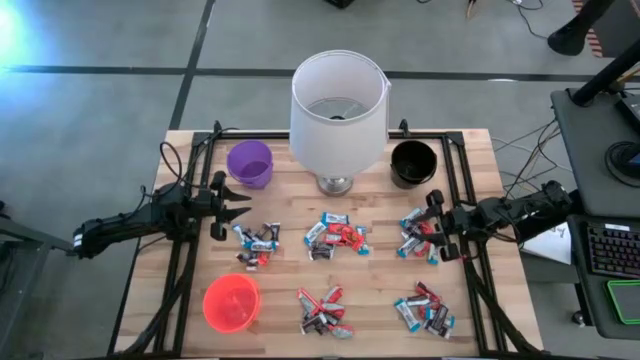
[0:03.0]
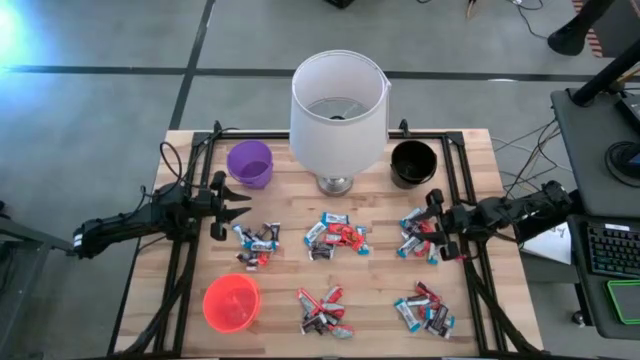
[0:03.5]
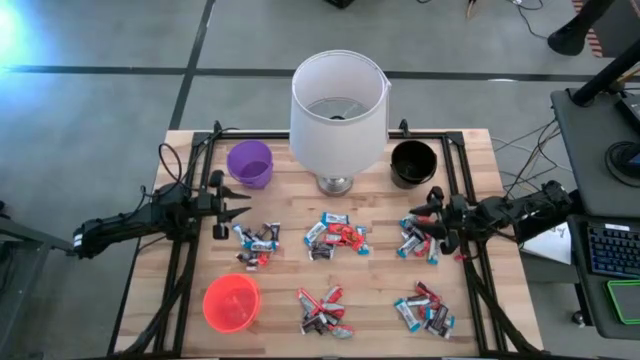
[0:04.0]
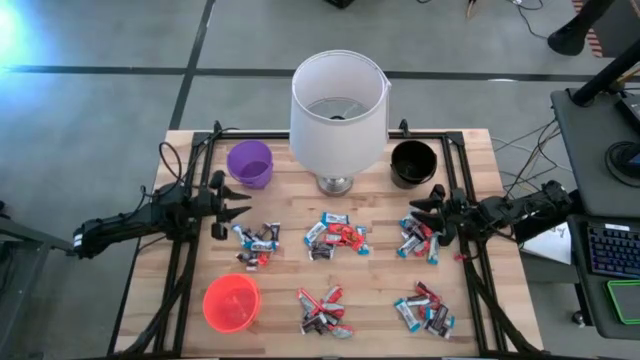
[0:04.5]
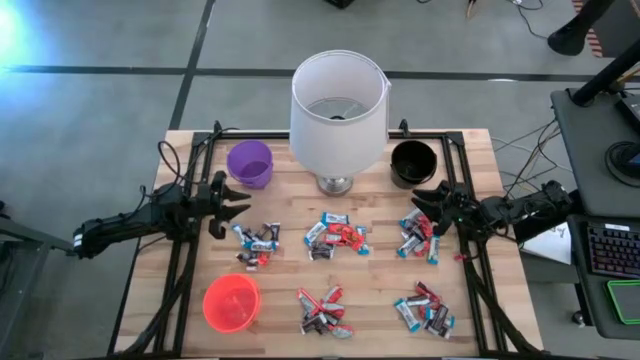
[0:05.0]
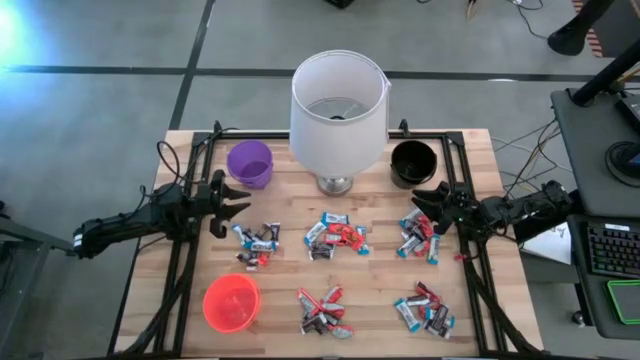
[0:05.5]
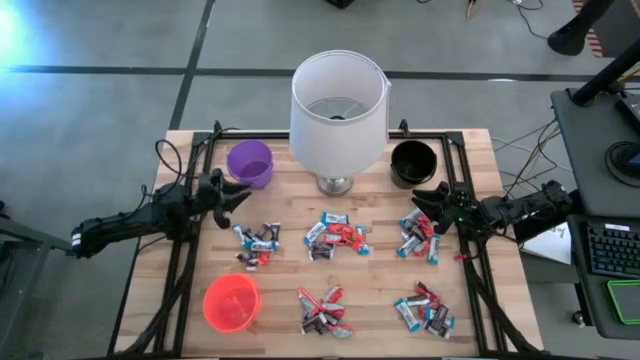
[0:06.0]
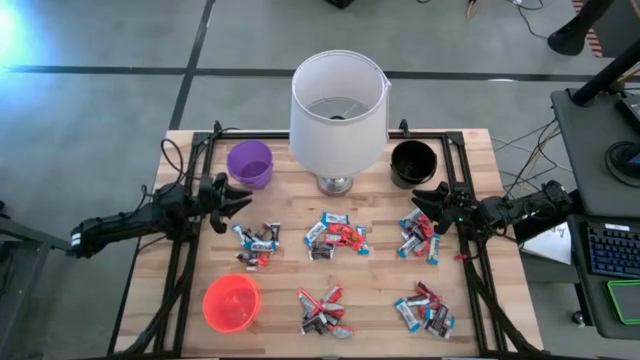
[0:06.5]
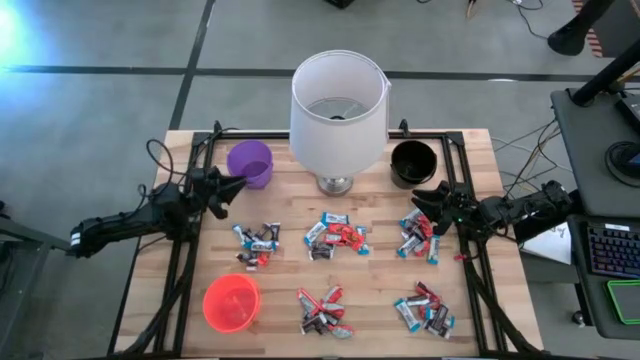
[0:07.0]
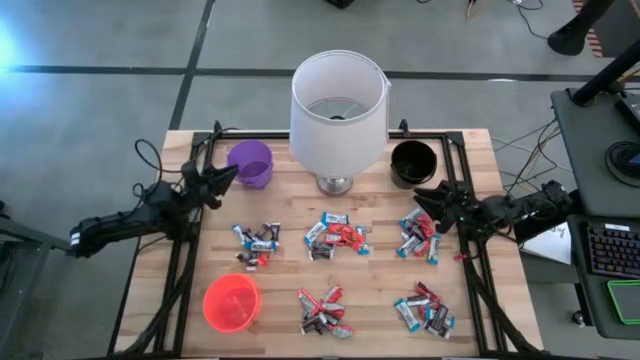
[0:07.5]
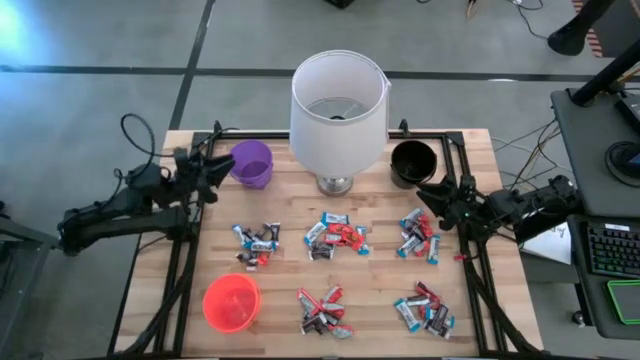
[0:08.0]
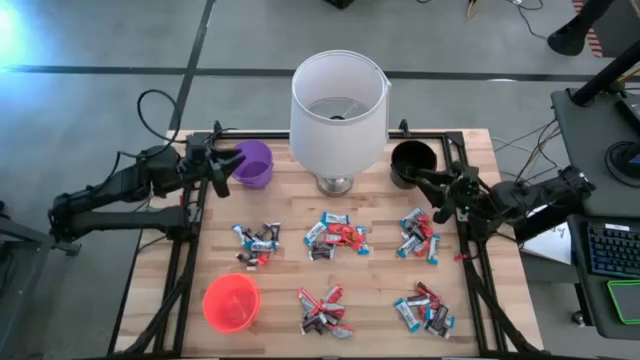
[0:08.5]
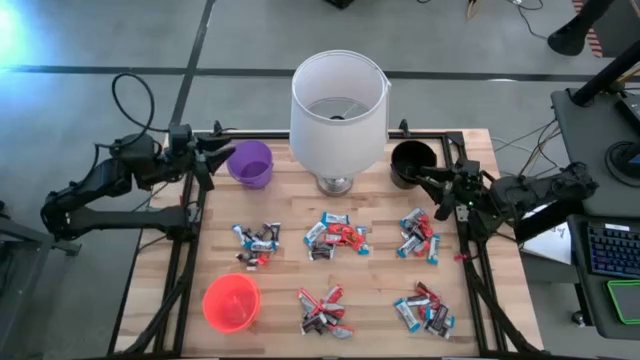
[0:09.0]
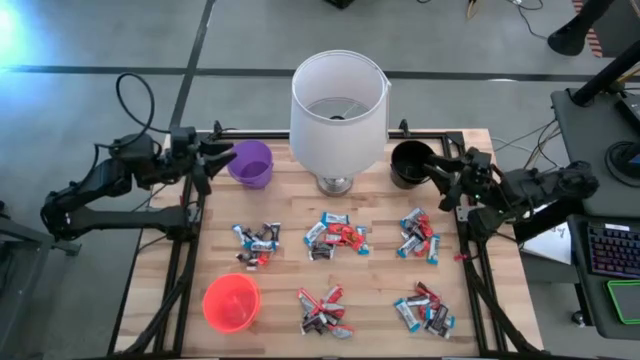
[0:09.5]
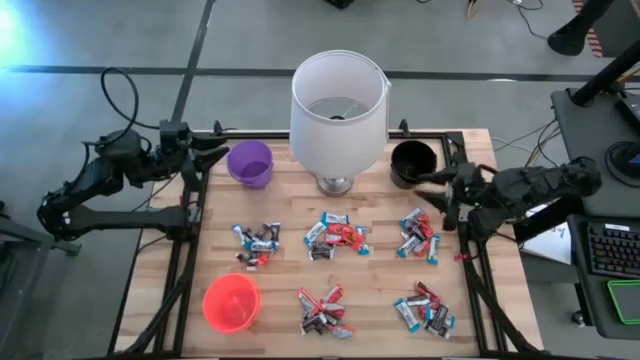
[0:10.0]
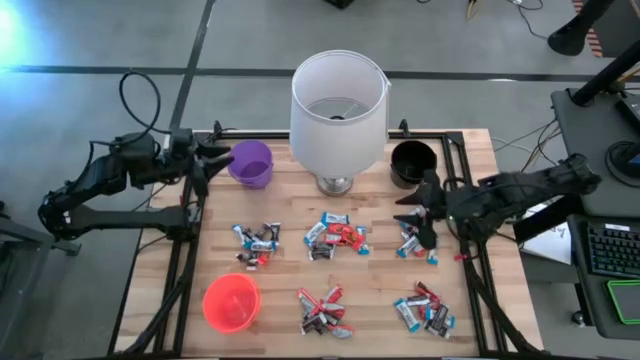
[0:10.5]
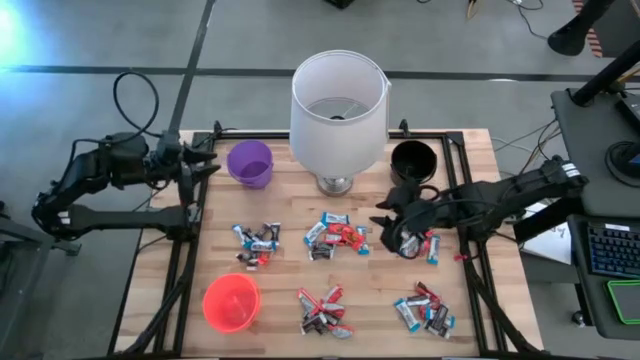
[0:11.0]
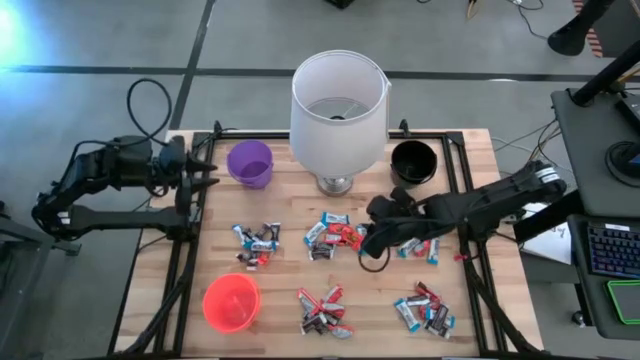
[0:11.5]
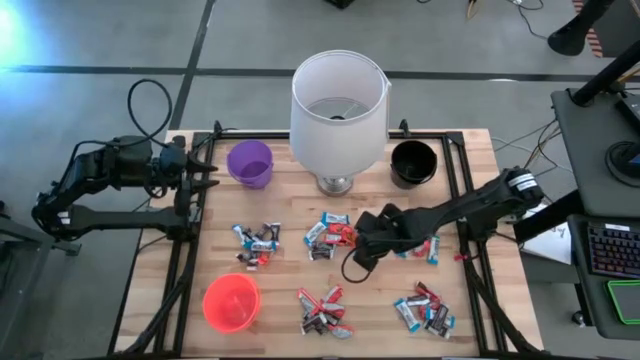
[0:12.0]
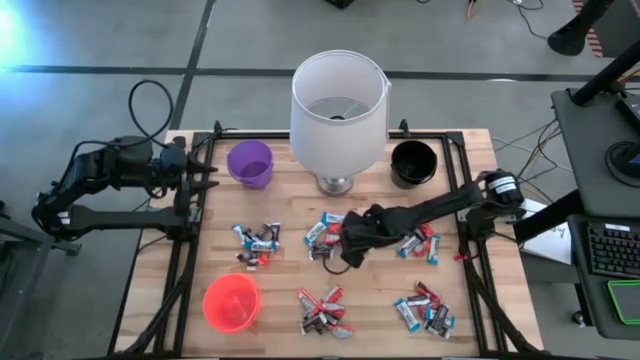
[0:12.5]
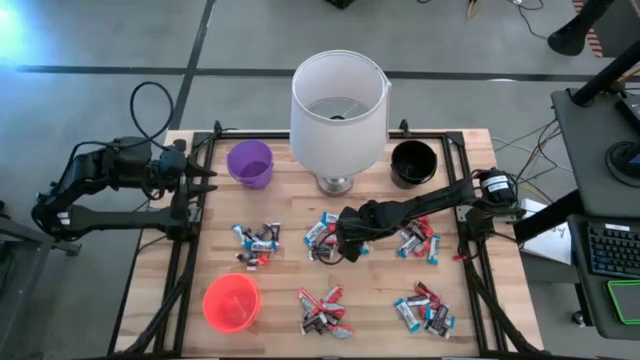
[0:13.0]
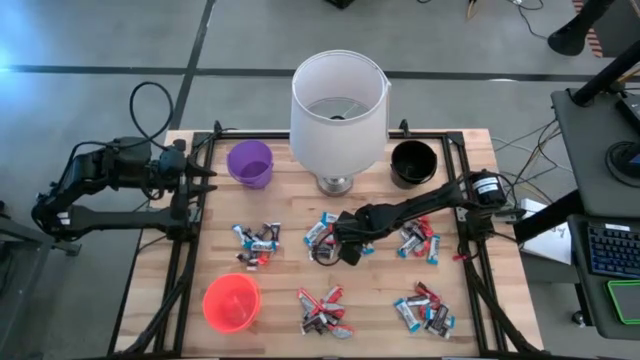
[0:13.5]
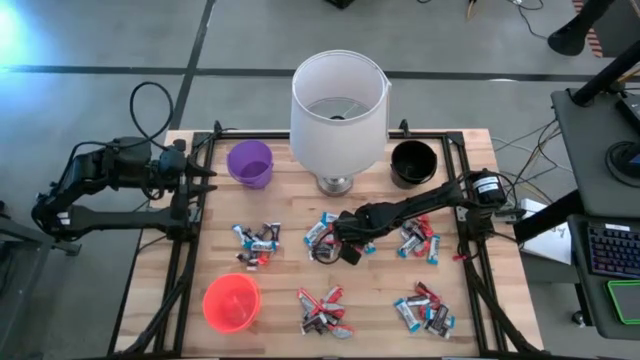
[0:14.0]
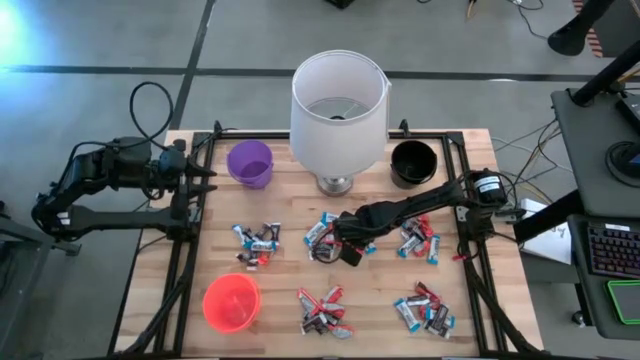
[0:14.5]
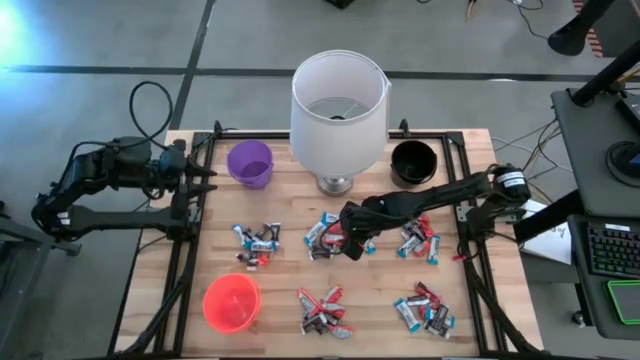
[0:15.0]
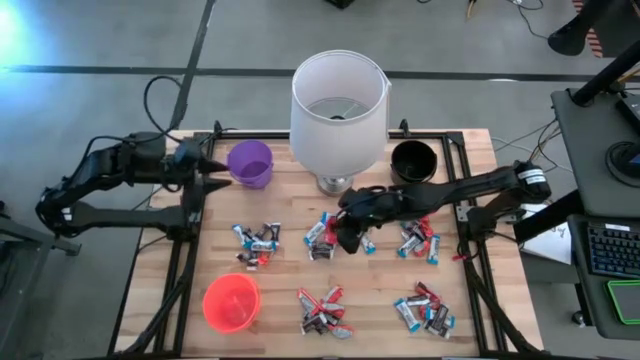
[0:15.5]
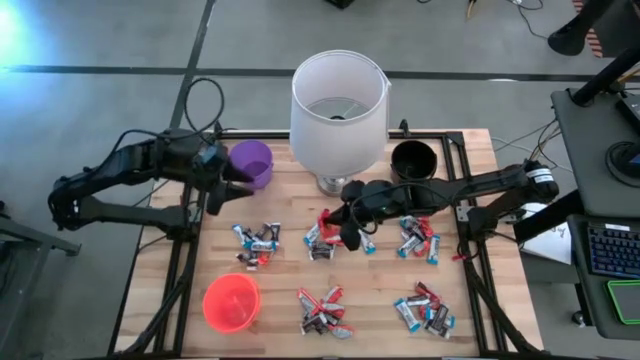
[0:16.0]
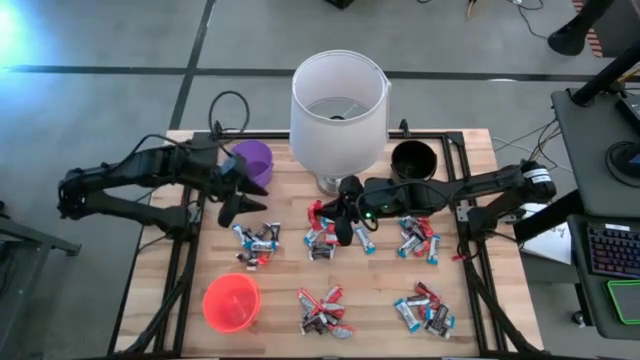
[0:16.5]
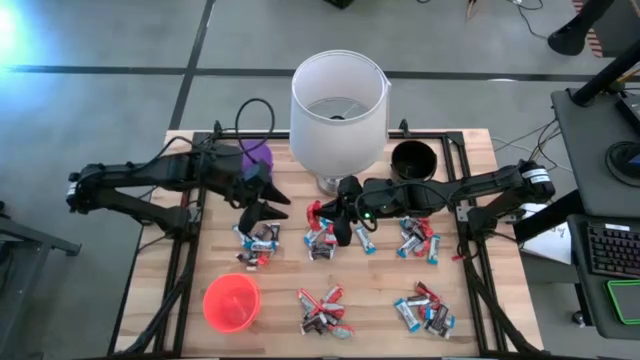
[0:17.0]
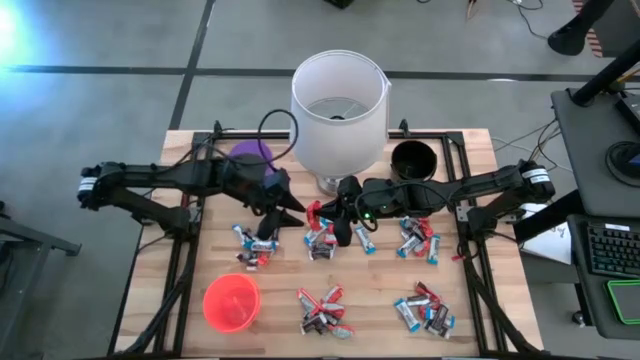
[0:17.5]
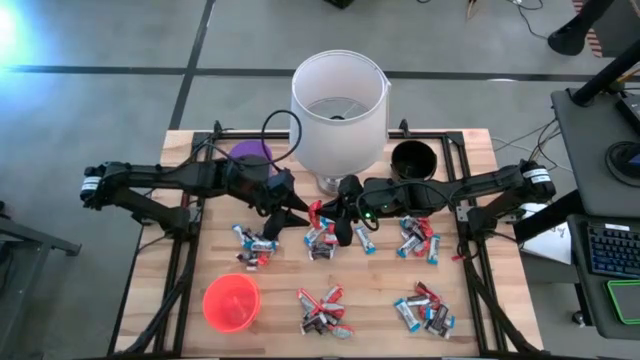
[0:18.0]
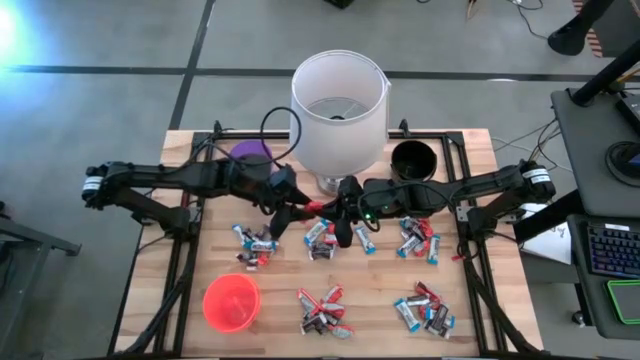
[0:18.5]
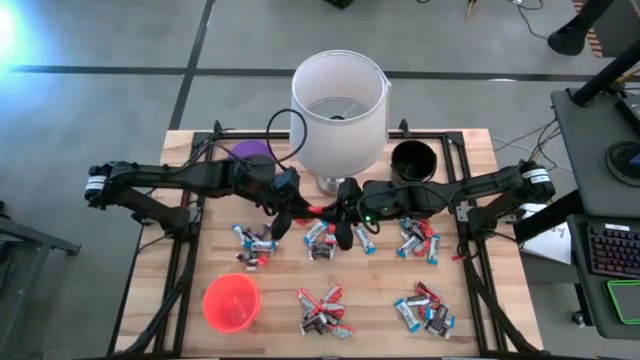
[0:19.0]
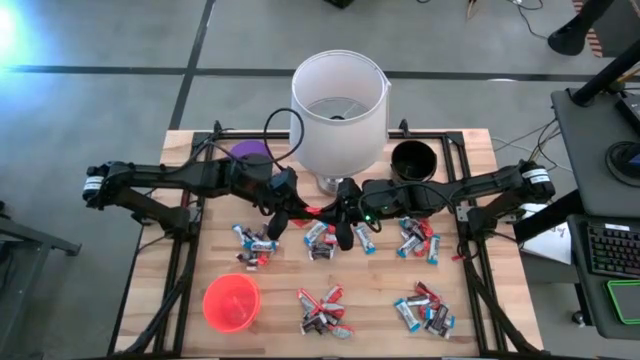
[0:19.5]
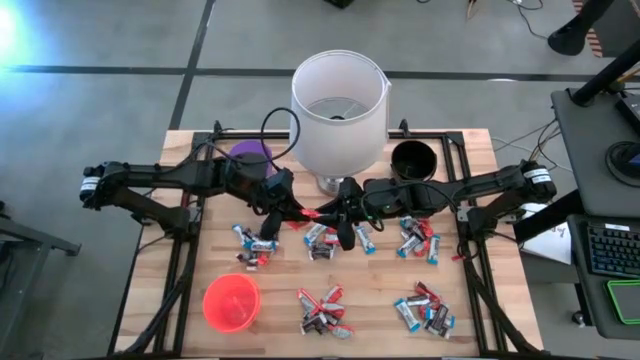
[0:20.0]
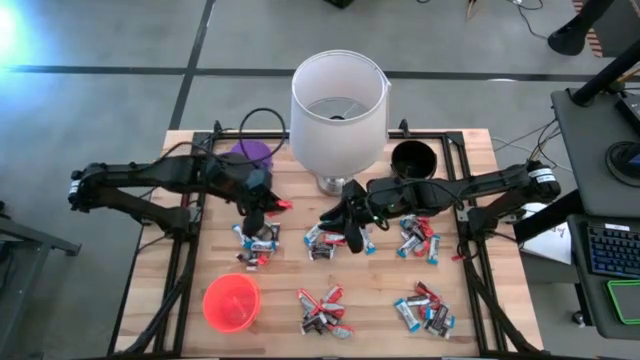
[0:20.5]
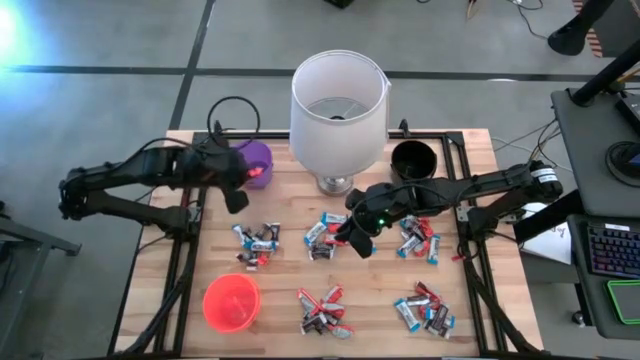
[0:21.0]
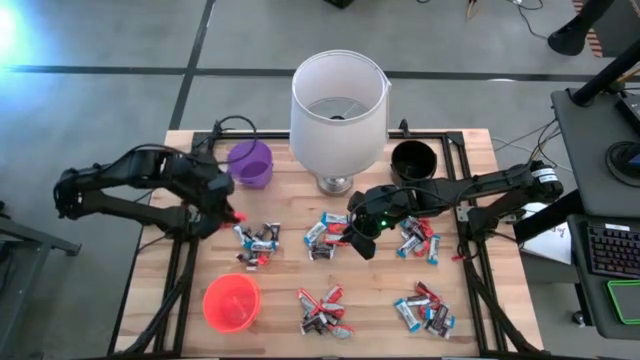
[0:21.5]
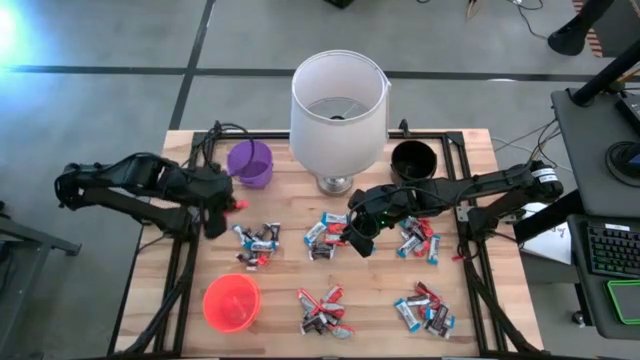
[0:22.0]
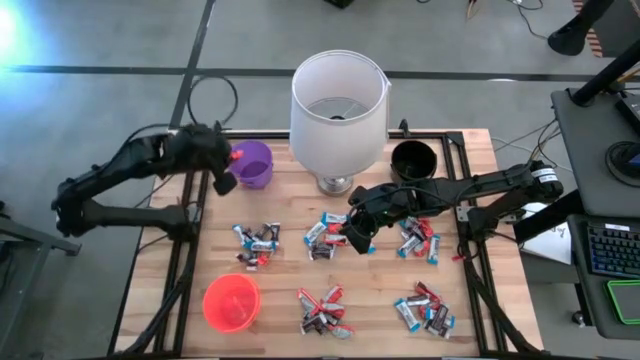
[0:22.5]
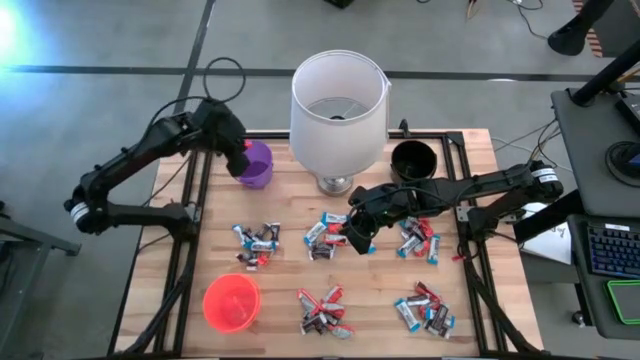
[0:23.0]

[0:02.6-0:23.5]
Task: Sort candy
Put the orange chocolate into the purple bucket

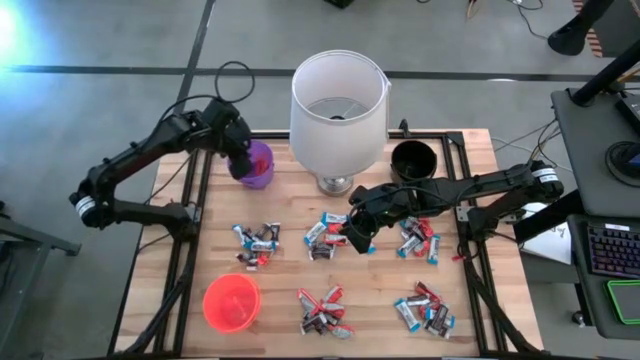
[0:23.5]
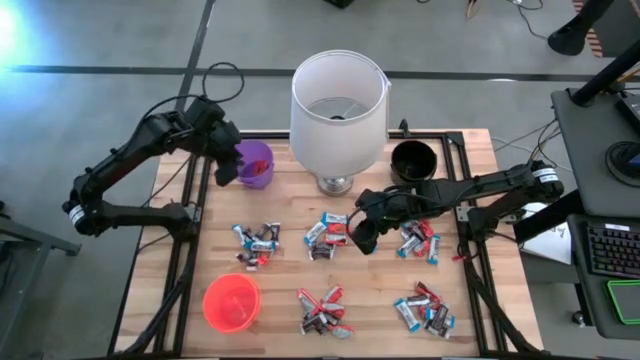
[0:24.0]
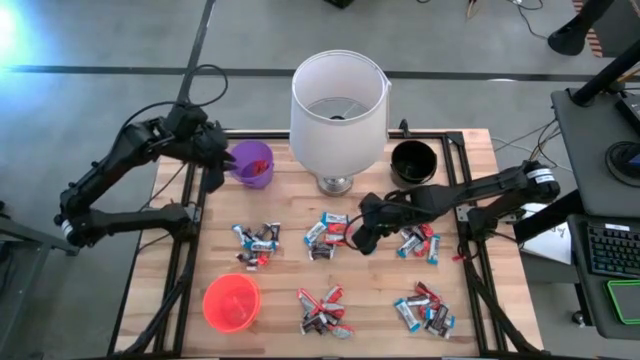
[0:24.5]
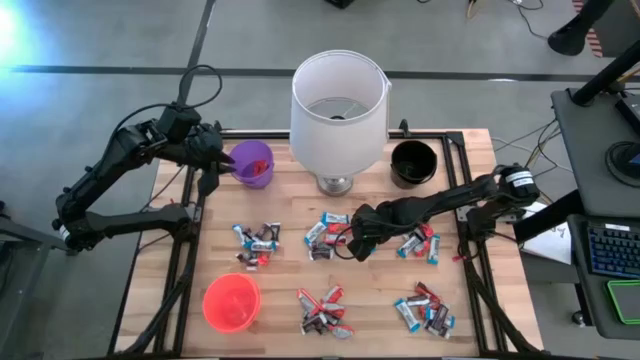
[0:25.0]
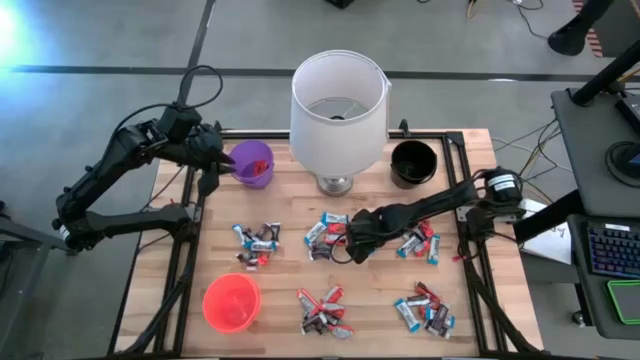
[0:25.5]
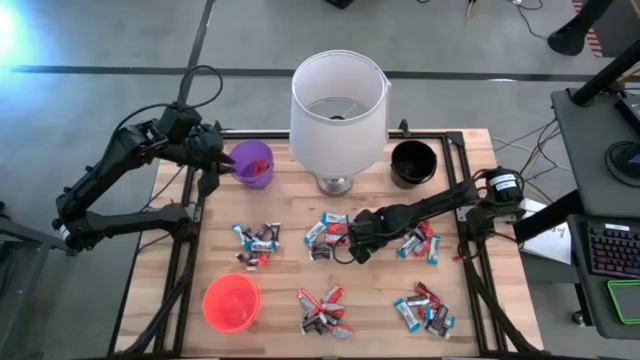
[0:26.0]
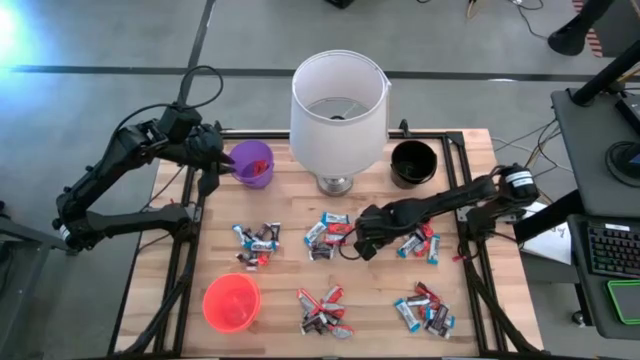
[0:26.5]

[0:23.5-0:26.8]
Put the white chocolate into the black bin
